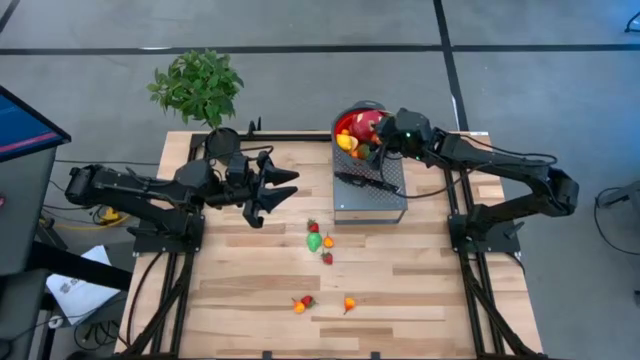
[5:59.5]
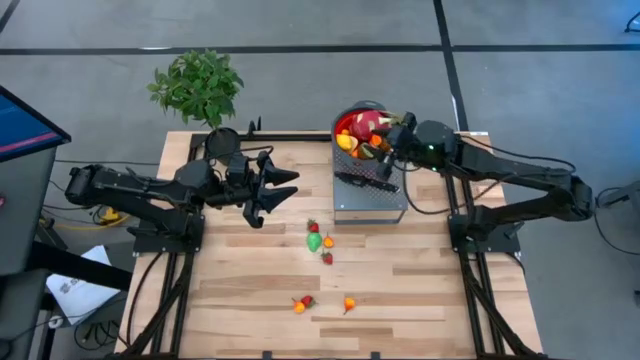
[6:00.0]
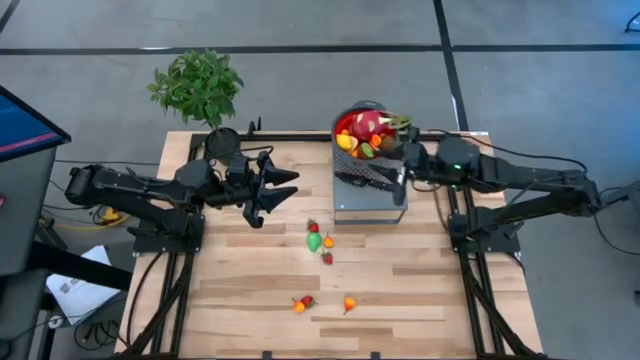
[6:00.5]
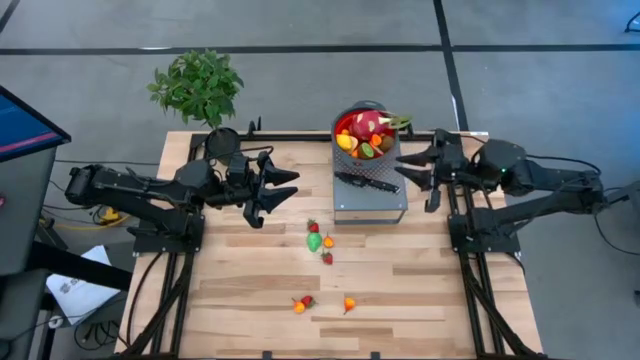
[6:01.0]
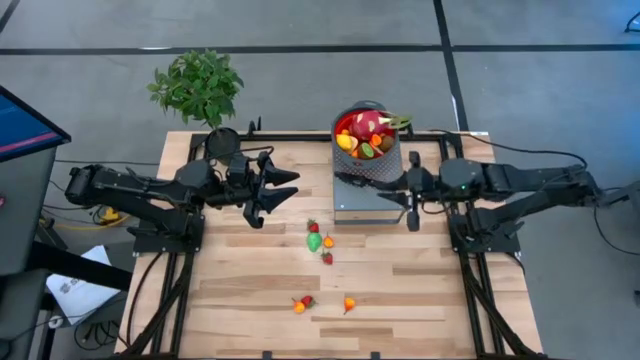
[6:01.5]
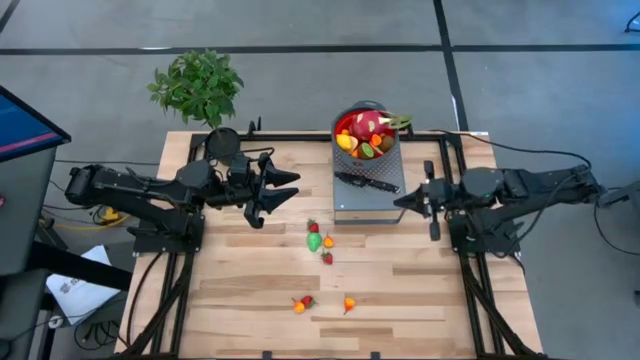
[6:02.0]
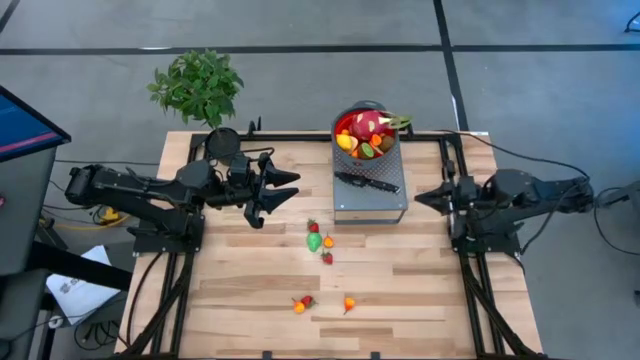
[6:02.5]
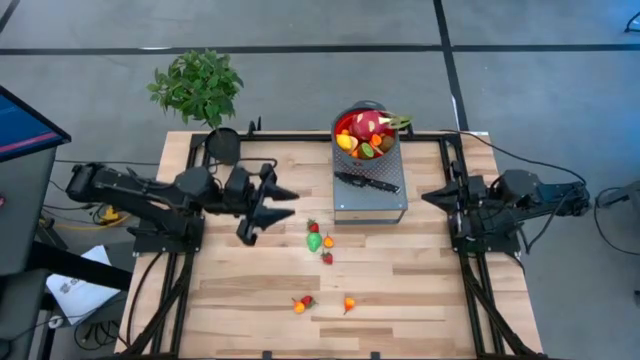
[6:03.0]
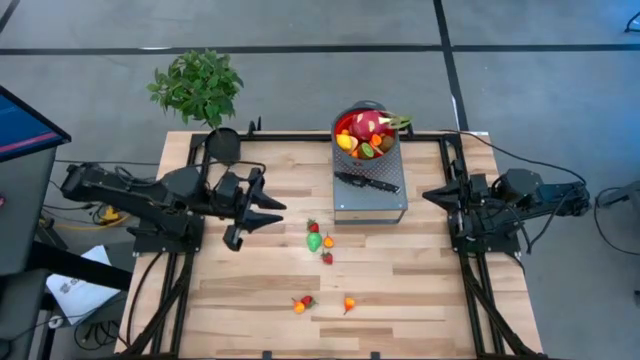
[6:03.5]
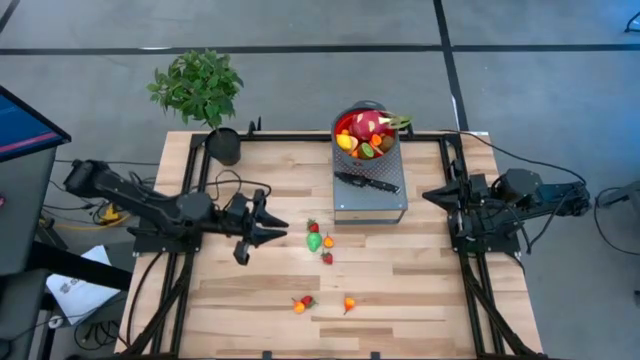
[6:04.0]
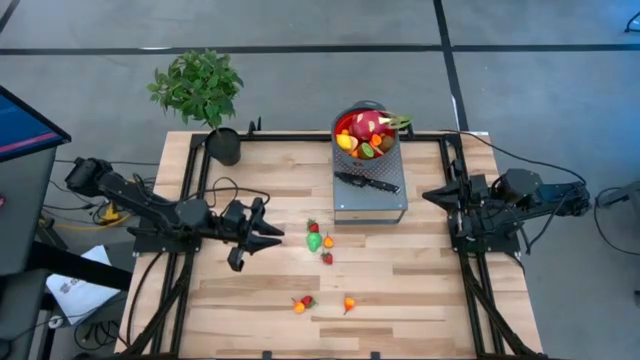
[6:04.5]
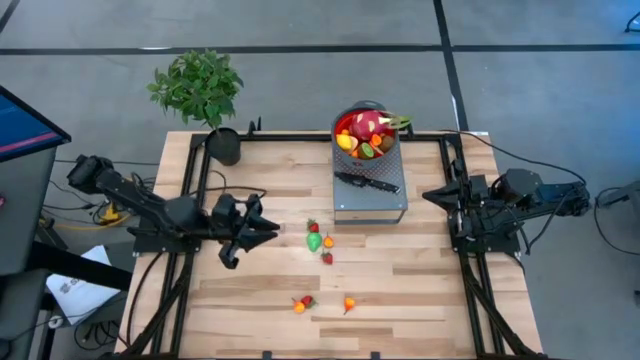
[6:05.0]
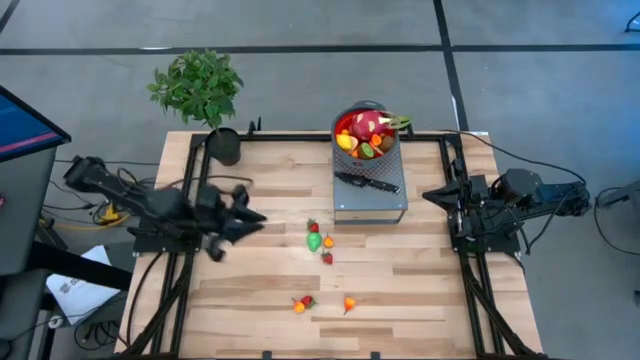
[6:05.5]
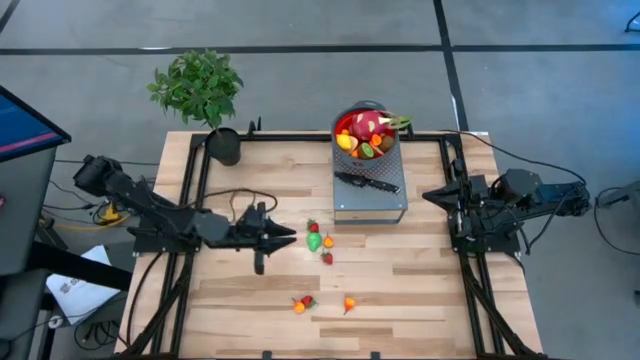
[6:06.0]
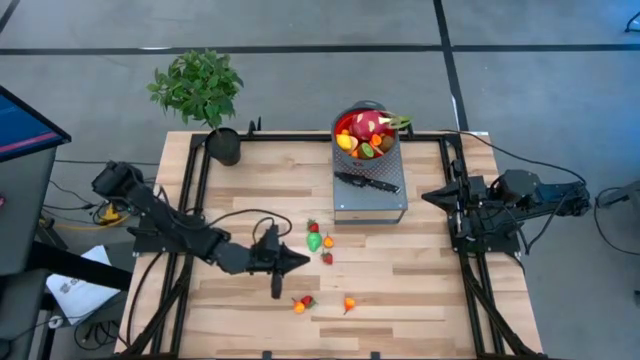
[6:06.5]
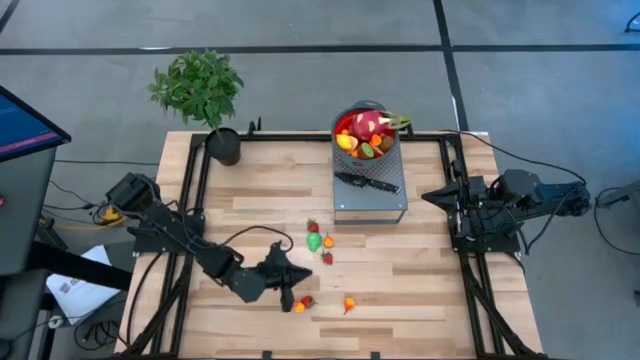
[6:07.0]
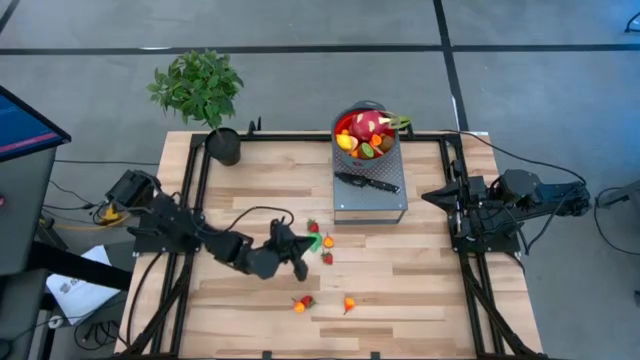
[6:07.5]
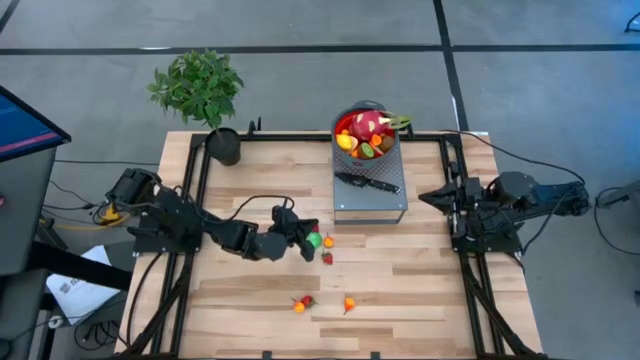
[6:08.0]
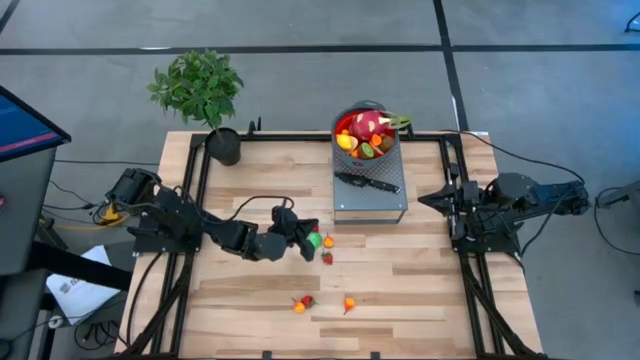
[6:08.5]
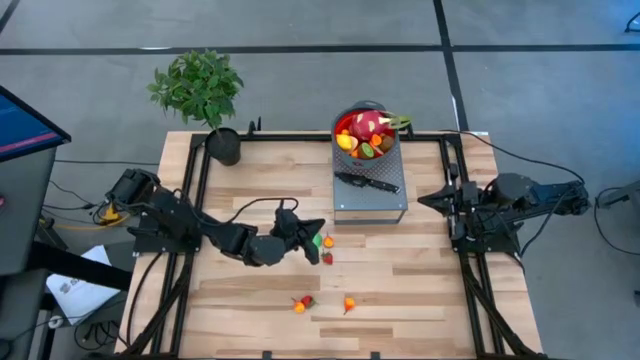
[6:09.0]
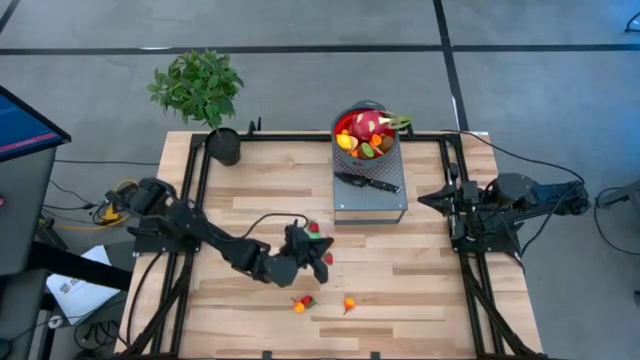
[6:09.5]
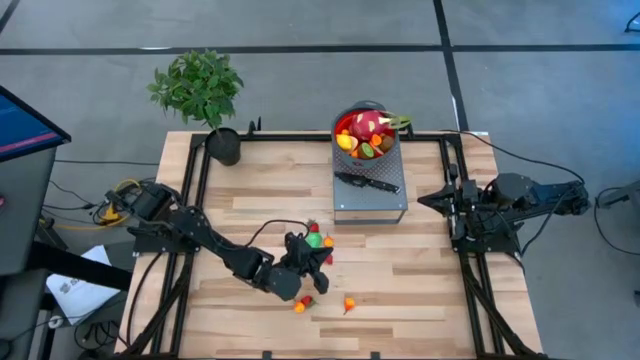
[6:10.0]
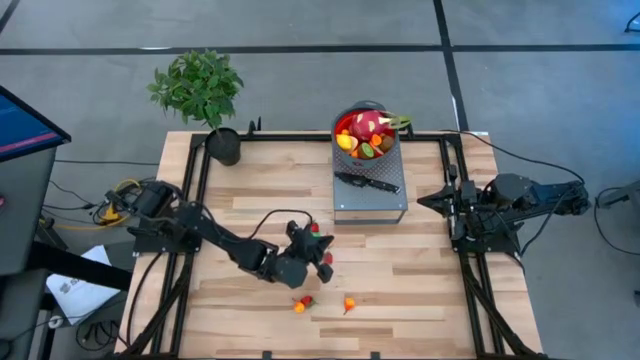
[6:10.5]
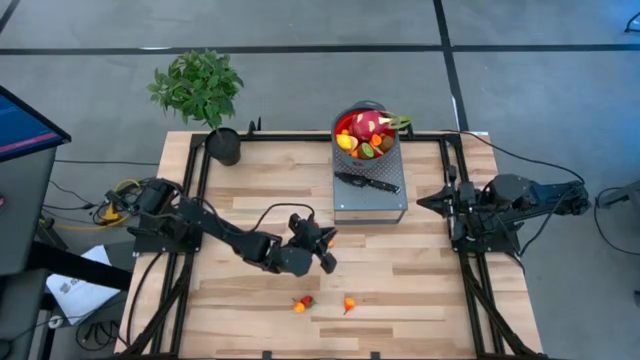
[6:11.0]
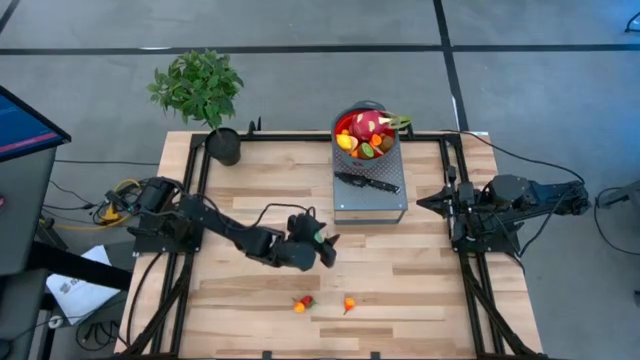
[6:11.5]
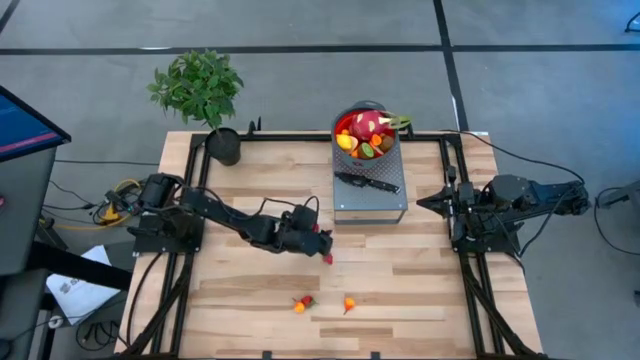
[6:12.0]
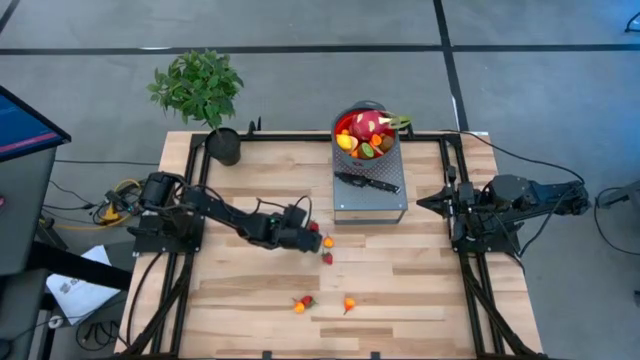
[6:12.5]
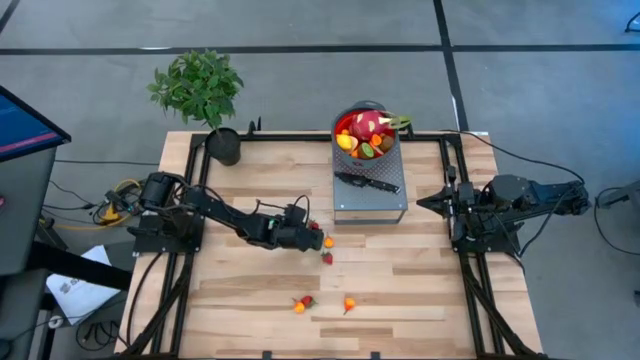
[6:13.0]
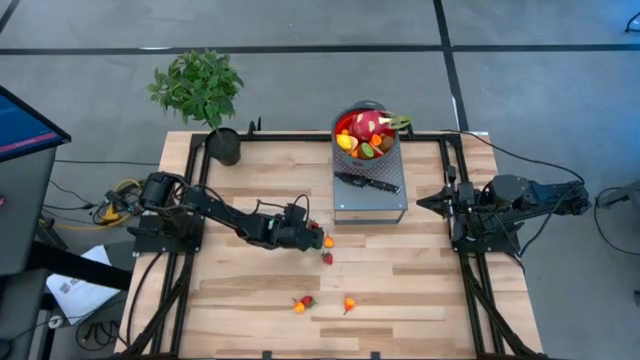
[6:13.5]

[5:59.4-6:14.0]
Task: Pick & Place Fruit
Put the strawberry into the red colander on the shelf

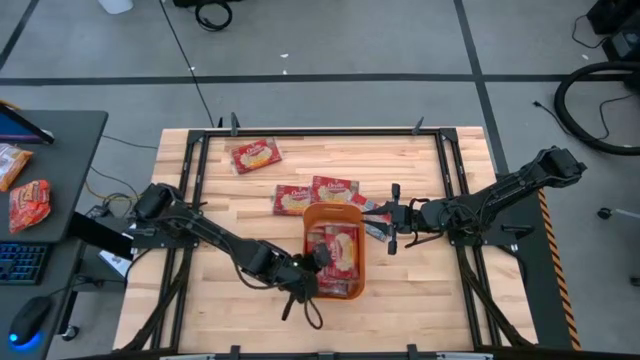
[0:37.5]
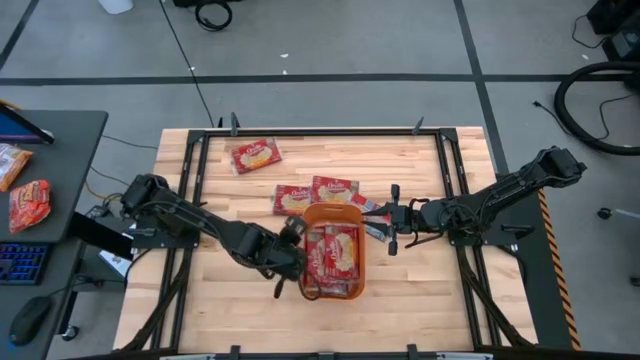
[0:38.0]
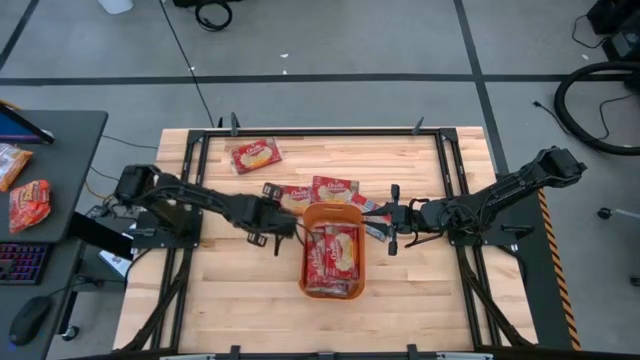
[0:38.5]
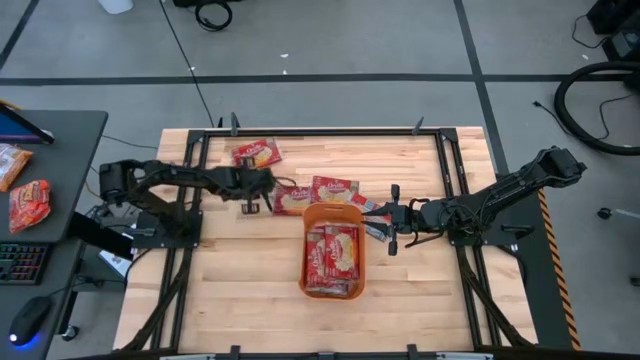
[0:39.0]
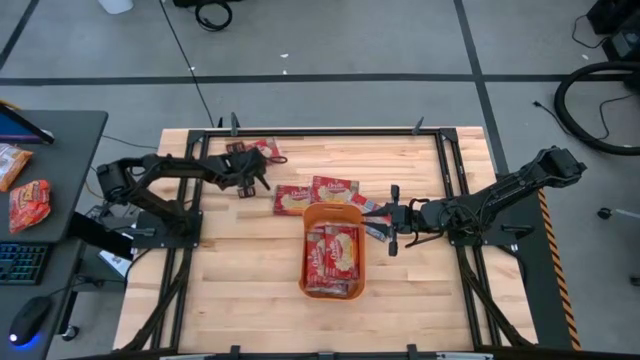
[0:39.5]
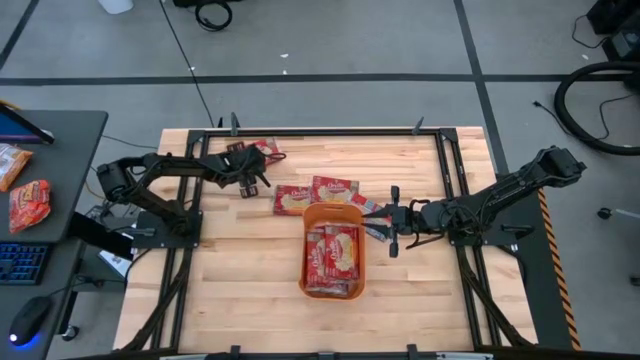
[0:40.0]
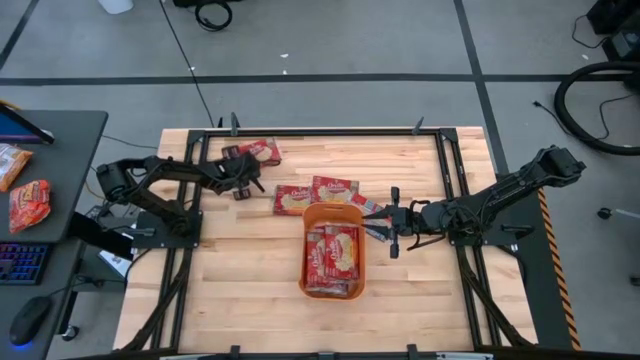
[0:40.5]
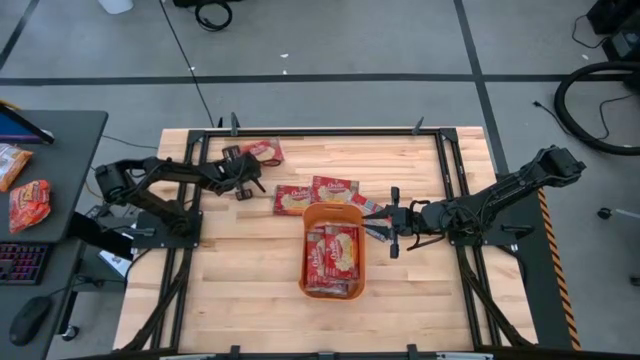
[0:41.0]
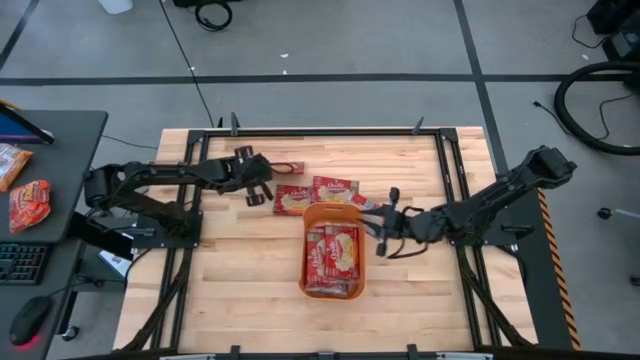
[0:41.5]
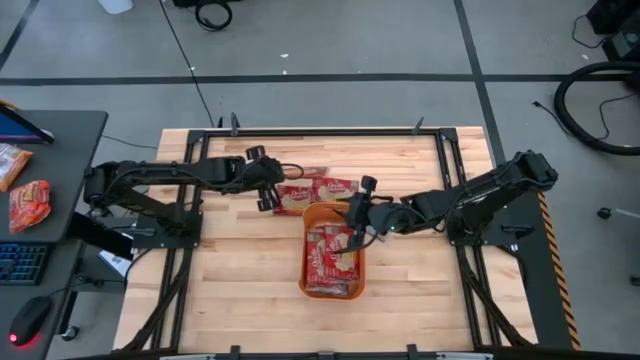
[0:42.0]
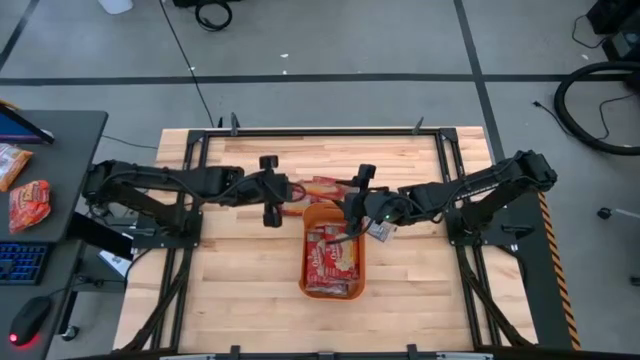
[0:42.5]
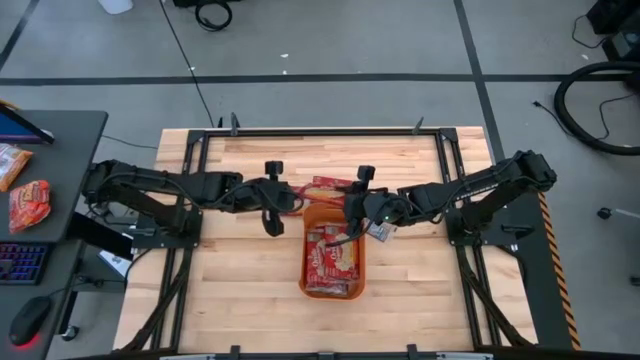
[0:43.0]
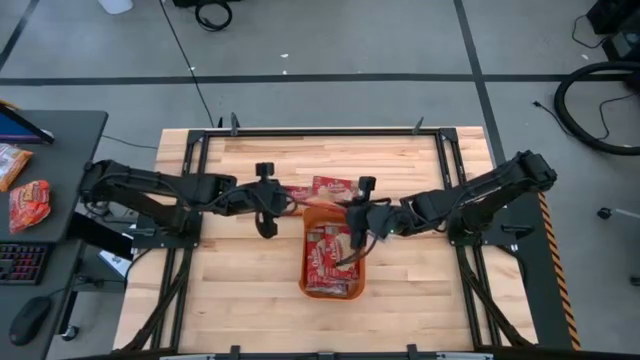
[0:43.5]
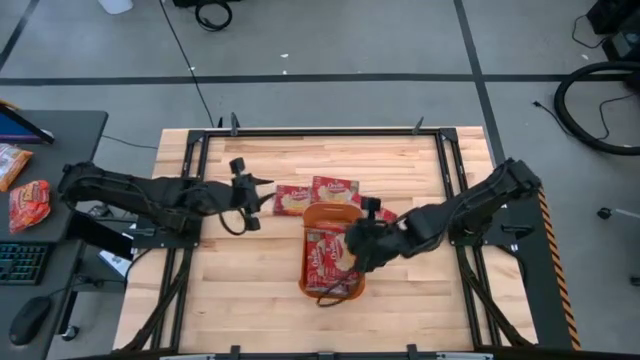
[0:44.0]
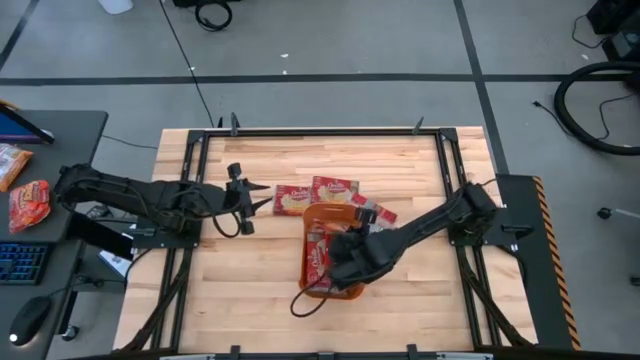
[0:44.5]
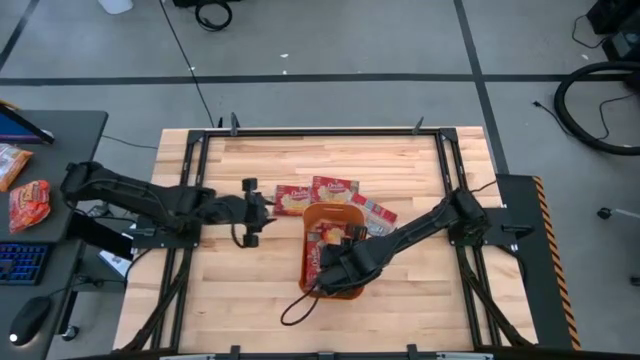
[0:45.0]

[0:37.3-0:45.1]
Task: Sort popcorn bags into baskets
Put the red popcorn bag into the orange bin

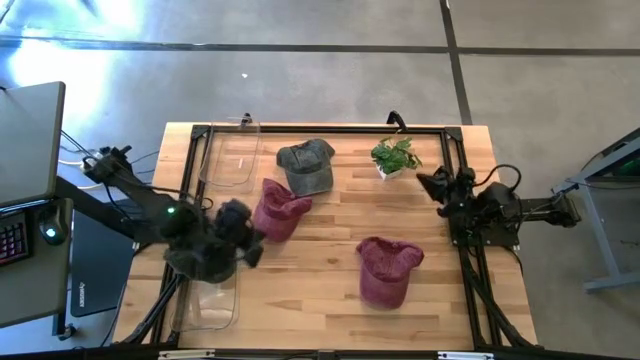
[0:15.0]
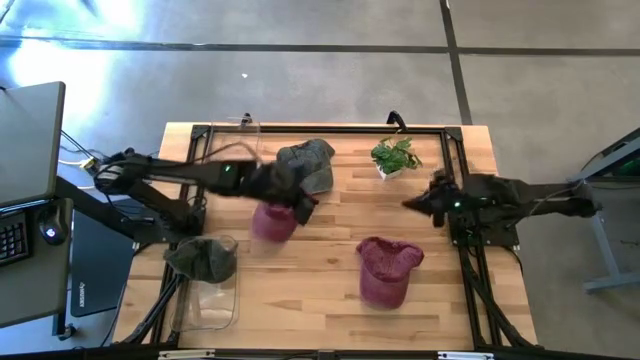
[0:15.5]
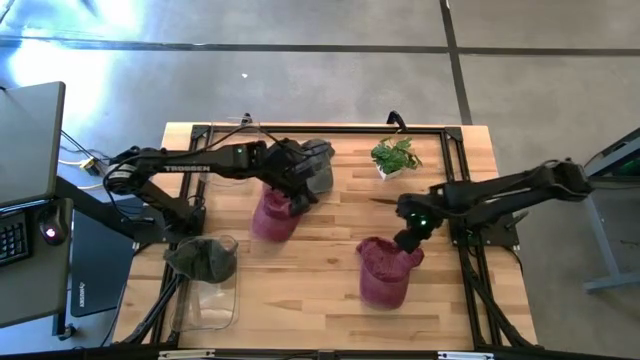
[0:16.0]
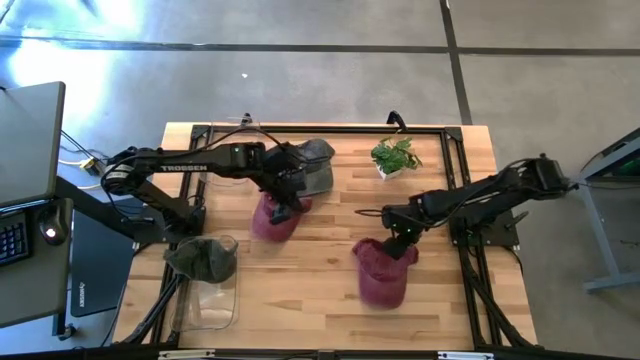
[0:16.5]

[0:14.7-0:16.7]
Task: Pick & Place hat
Put the bottom red cap into the top transparent bin
